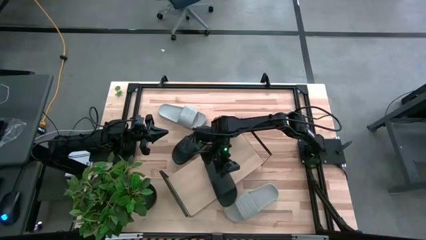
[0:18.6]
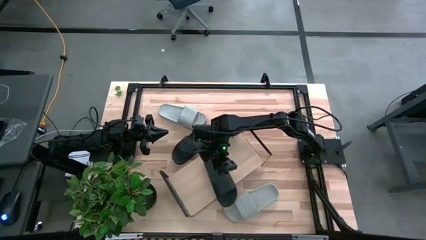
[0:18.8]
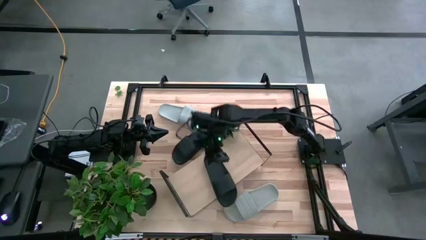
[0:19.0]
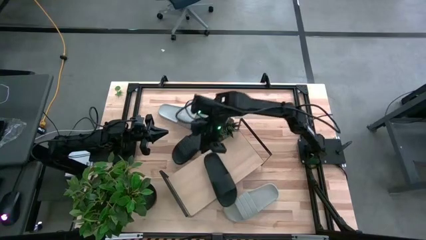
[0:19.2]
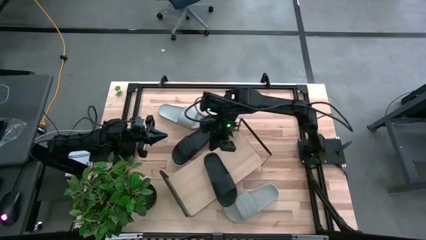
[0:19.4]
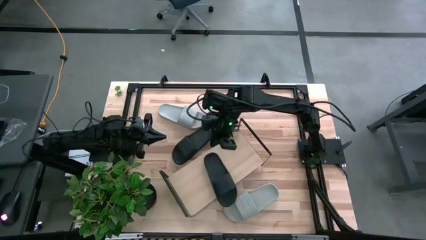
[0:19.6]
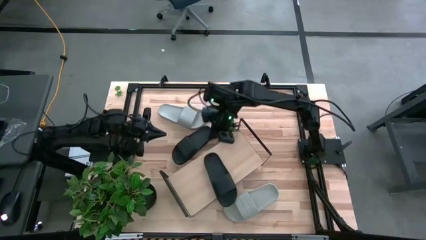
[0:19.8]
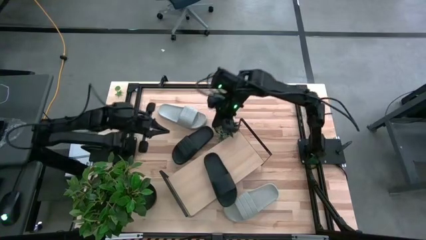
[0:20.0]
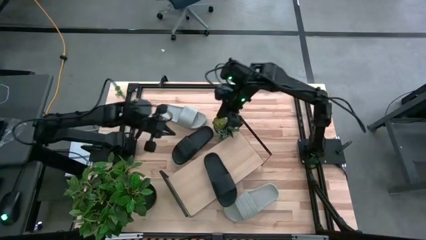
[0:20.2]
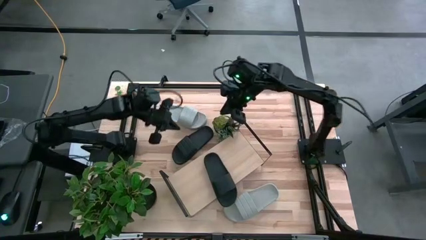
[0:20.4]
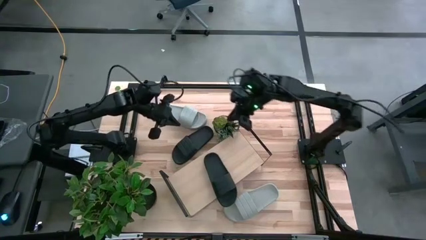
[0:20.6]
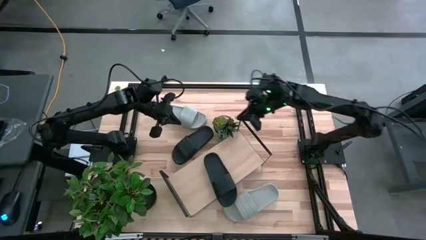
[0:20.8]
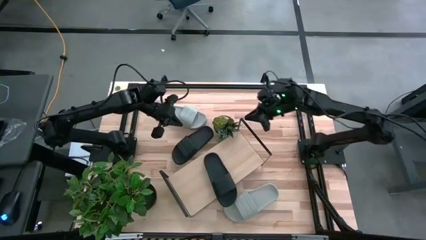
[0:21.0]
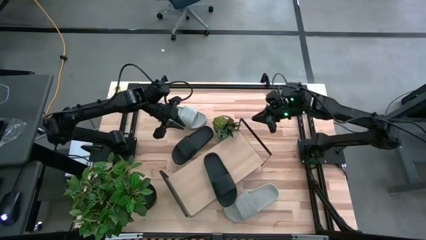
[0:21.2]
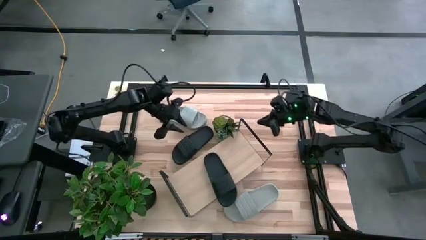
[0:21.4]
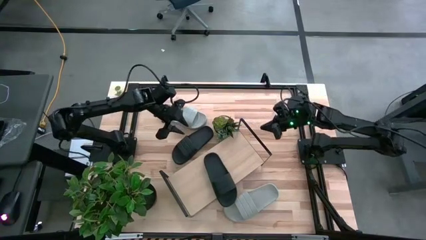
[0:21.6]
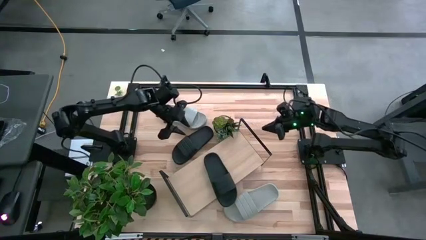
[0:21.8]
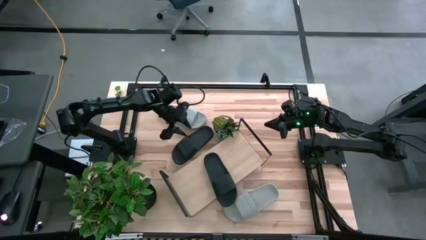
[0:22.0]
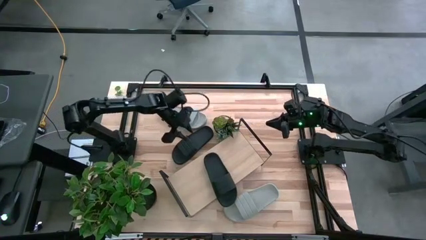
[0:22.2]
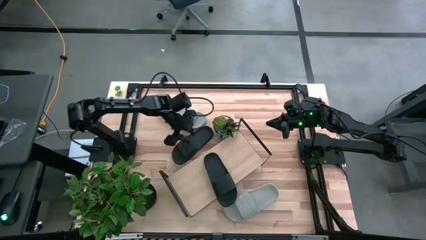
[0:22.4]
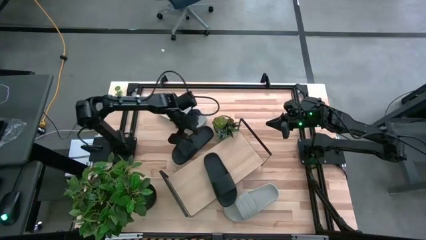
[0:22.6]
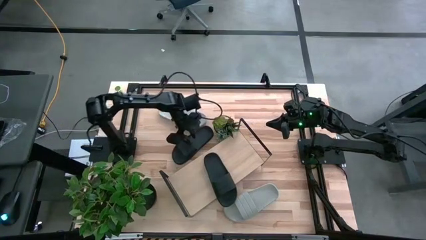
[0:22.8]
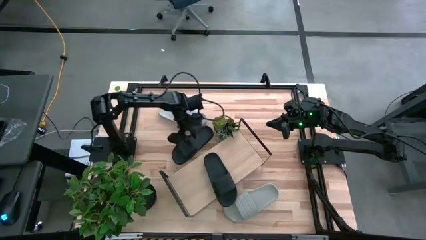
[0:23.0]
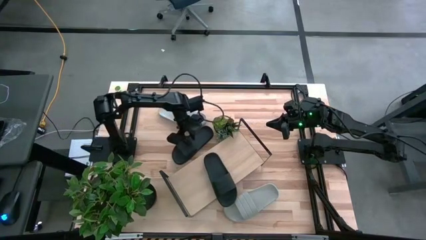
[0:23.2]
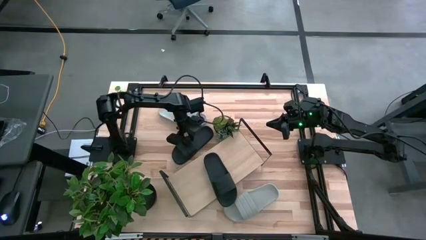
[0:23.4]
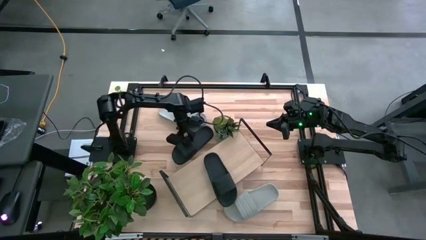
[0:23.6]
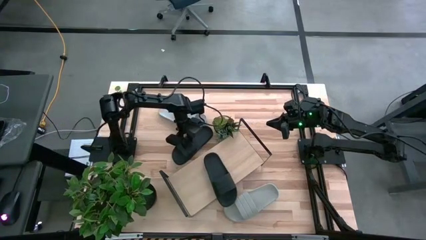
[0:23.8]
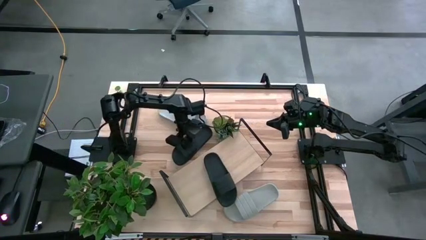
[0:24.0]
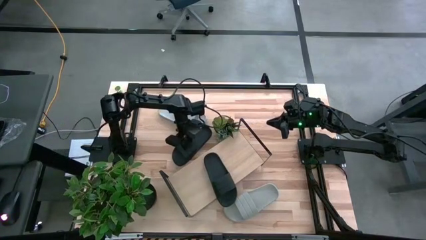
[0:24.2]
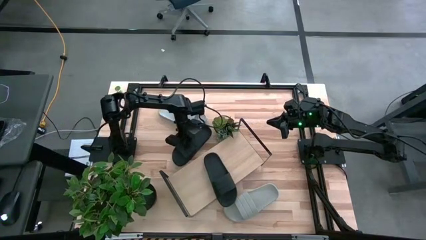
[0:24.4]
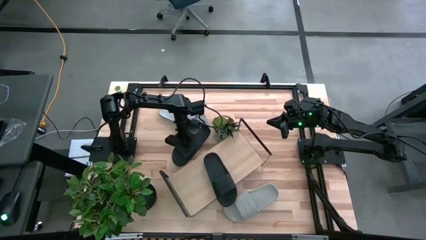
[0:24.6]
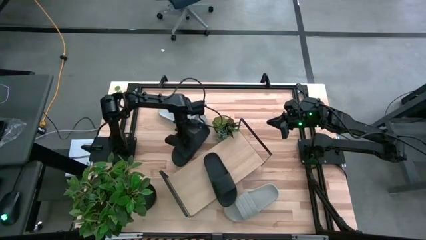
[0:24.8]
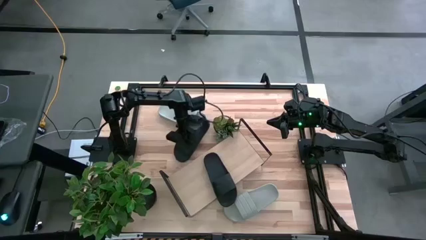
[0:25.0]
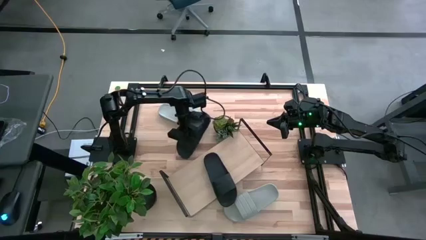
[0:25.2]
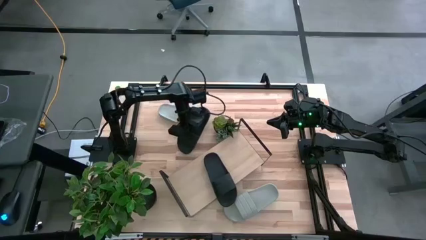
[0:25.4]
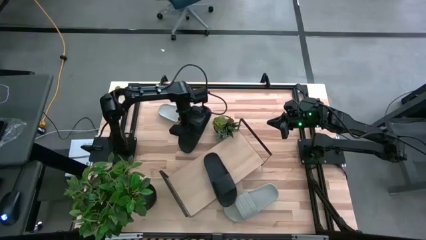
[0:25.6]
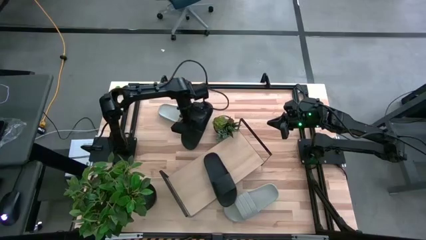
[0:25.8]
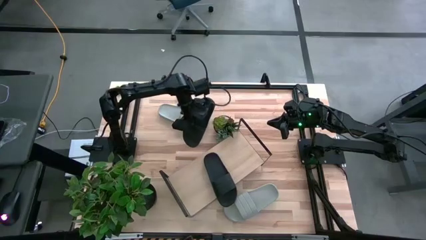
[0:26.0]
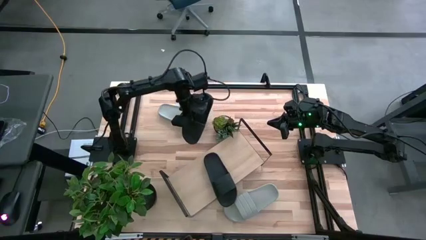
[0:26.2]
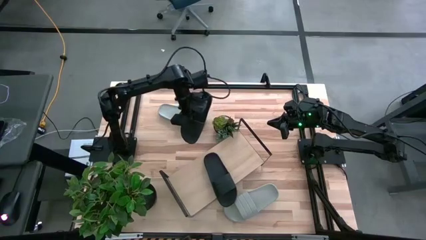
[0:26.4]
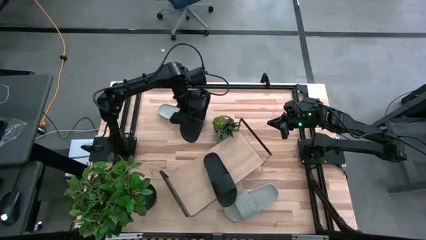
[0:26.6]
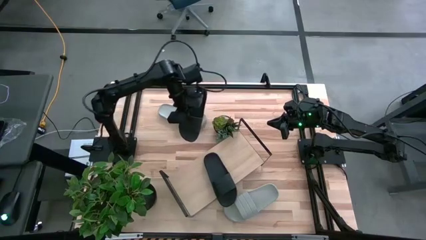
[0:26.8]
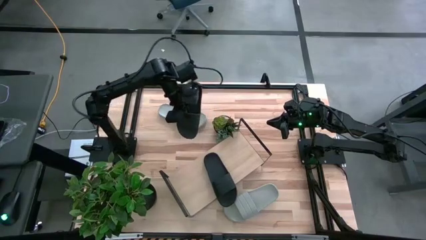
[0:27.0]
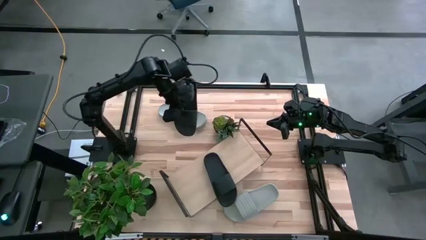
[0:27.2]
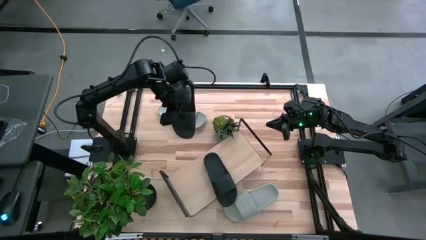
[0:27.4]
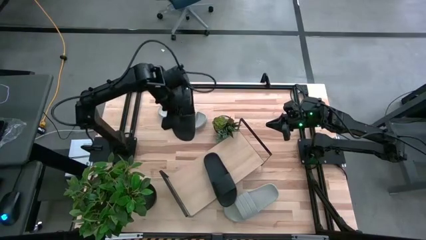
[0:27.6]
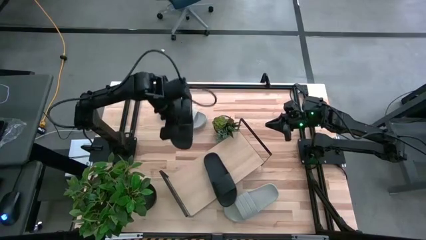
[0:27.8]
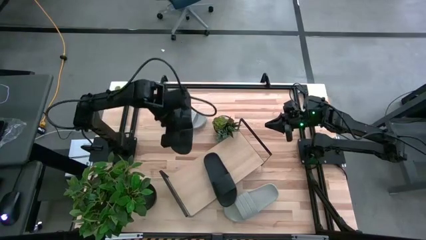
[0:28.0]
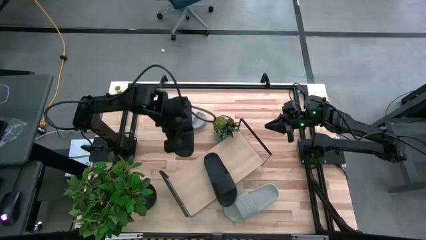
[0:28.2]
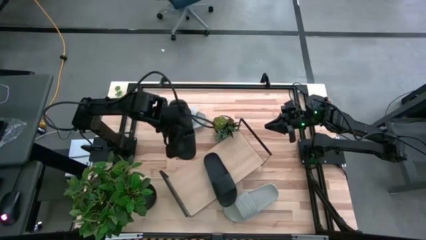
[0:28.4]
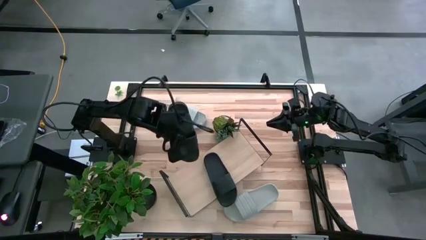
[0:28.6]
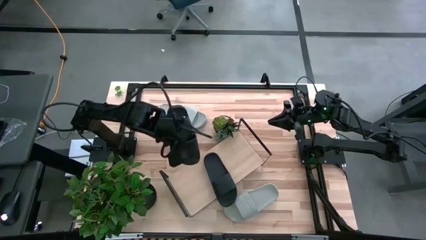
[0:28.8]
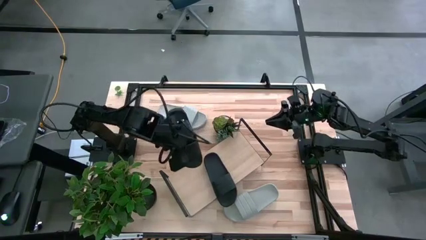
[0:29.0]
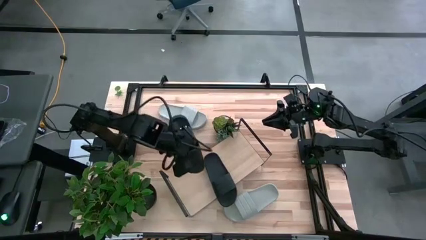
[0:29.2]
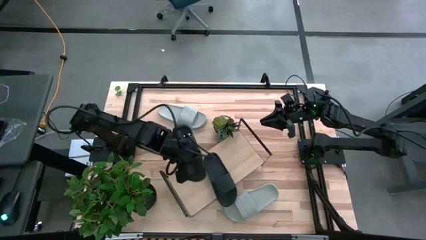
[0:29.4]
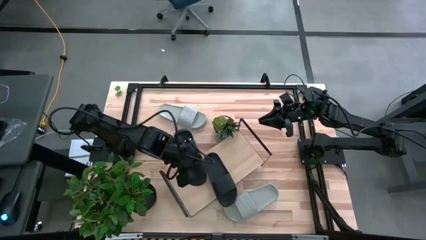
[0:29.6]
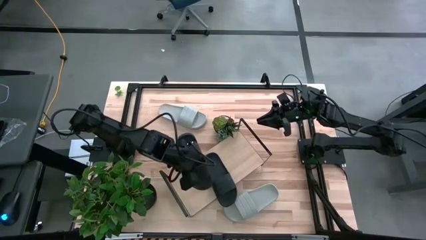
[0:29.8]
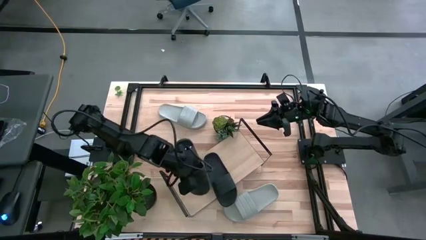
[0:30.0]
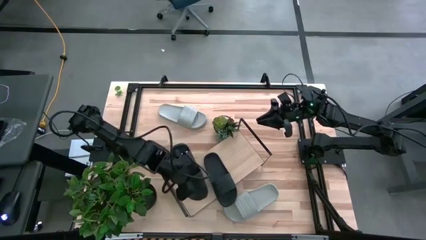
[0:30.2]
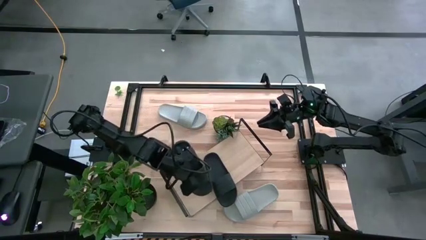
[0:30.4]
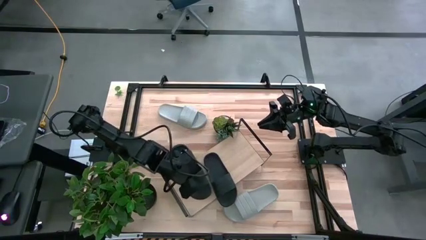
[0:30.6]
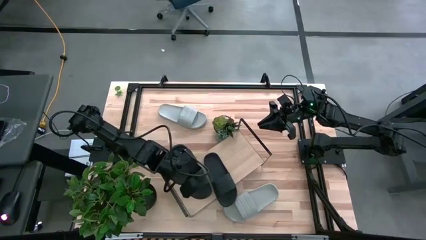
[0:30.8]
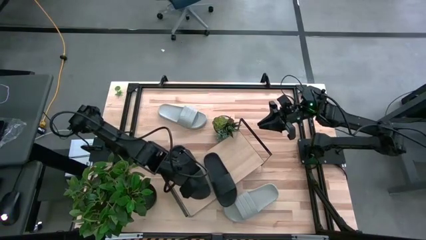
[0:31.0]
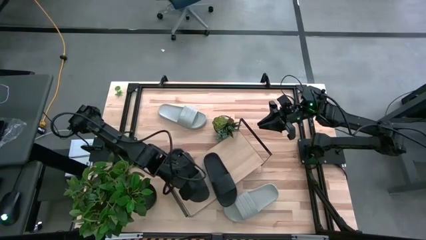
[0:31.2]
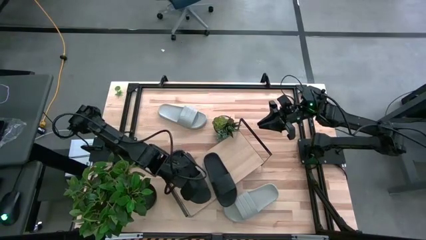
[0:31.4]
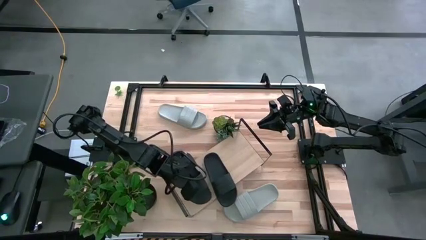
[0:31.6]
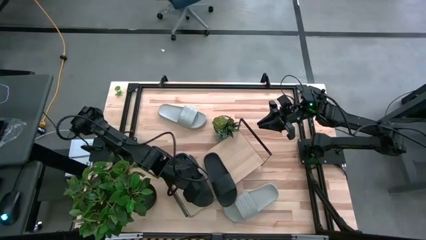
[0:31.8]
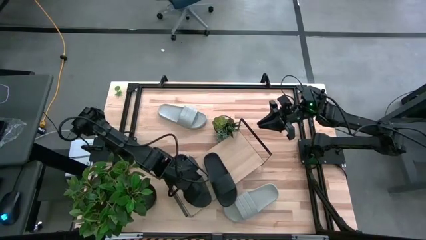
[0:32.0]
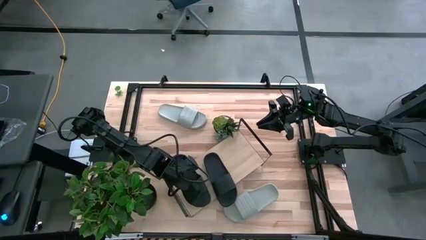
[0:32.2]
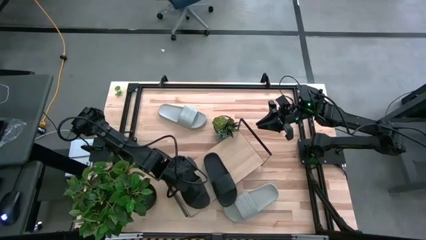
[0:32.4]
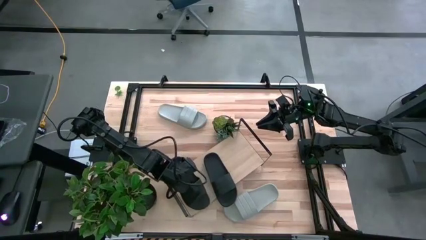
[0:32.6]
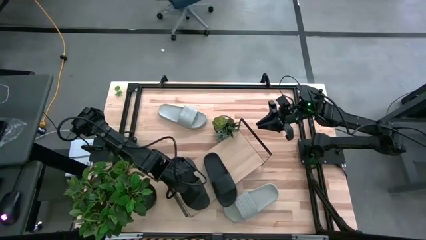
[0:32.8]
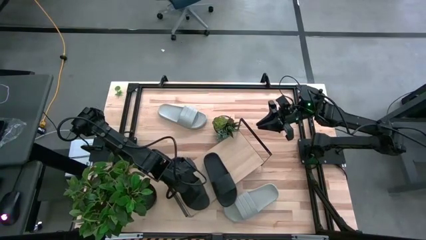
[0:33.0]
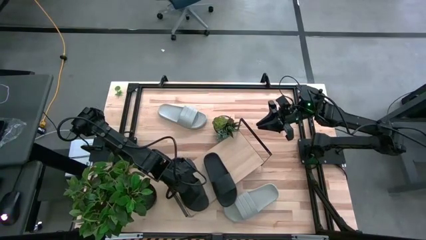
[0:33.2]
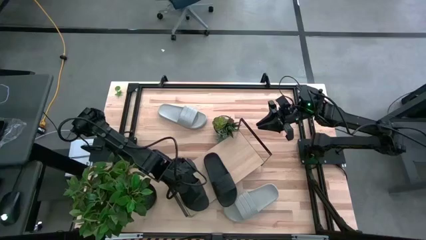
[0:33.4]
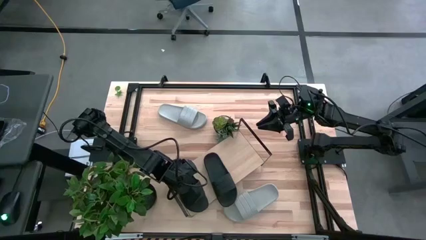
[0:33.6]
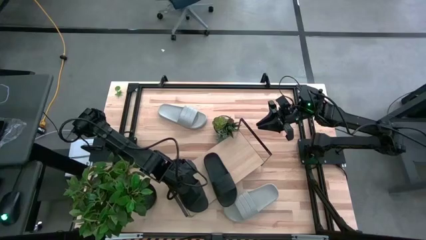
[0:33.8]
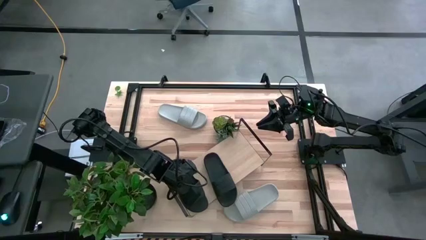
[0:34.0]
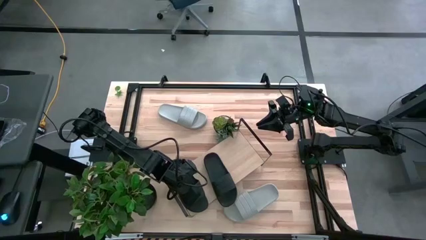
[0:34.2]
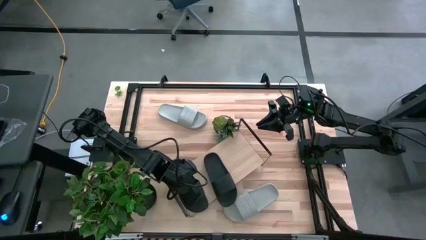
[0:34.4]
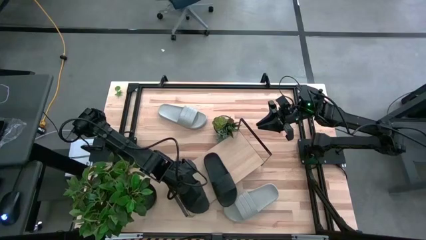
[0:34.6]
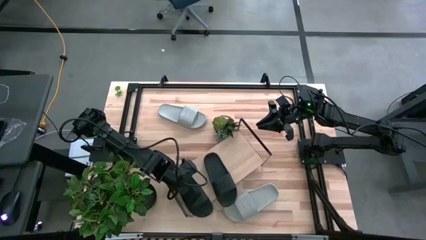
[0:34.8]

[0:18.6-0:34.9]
Task: Pick and place slides into the shelf
Put the black slipper on the shelf
